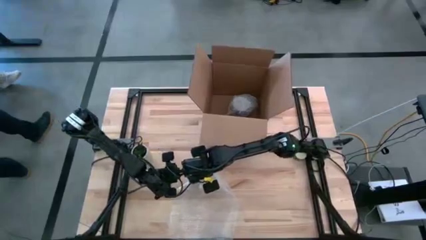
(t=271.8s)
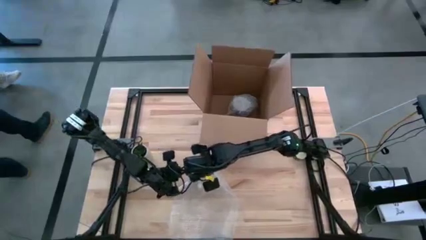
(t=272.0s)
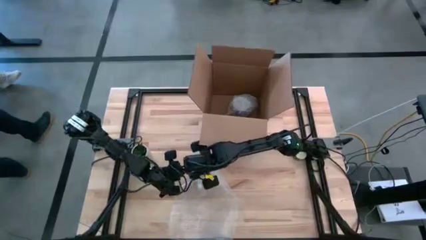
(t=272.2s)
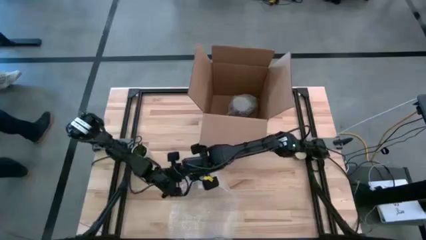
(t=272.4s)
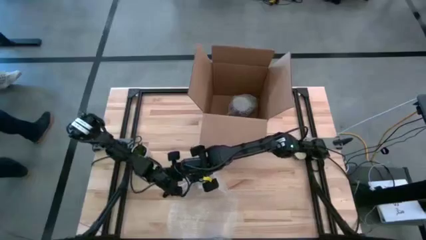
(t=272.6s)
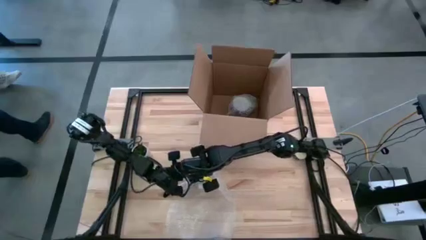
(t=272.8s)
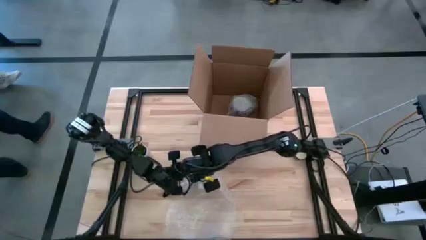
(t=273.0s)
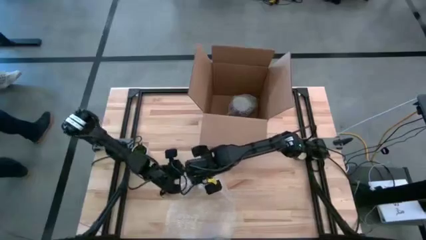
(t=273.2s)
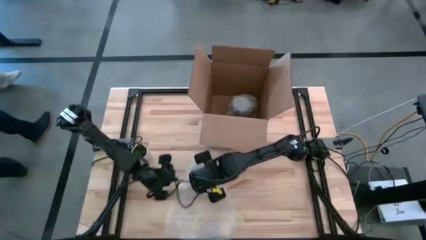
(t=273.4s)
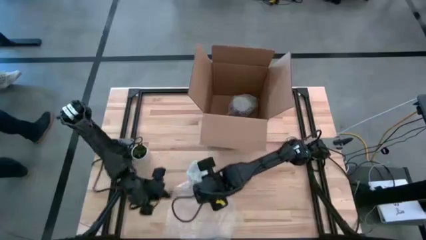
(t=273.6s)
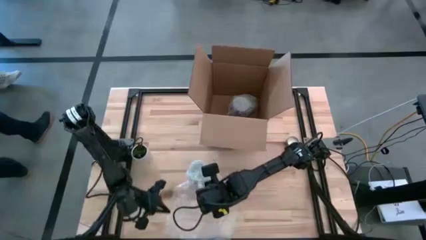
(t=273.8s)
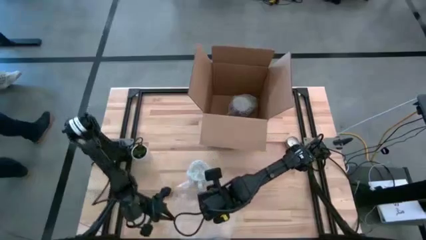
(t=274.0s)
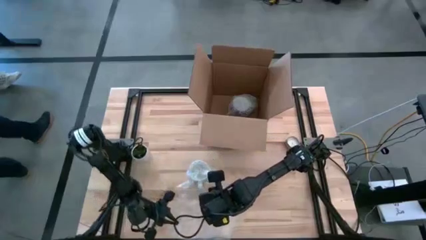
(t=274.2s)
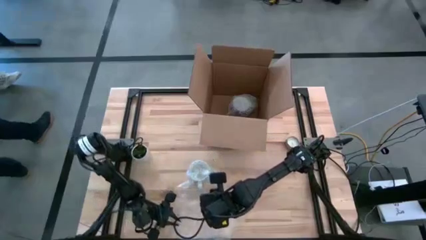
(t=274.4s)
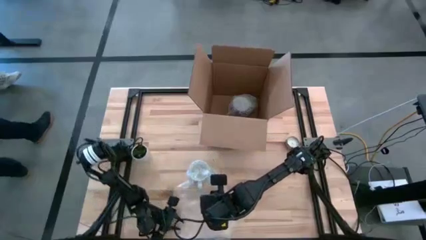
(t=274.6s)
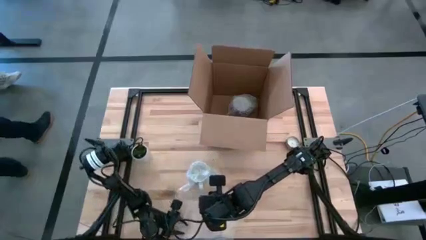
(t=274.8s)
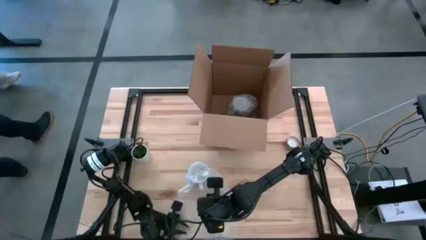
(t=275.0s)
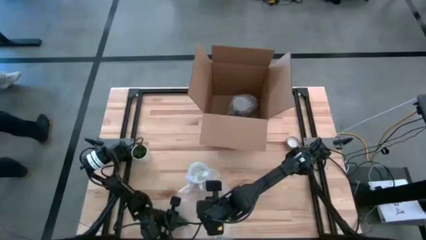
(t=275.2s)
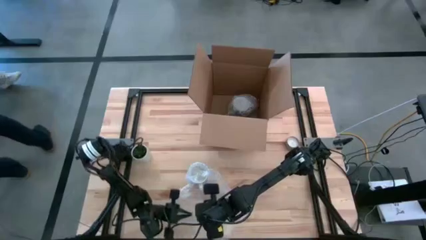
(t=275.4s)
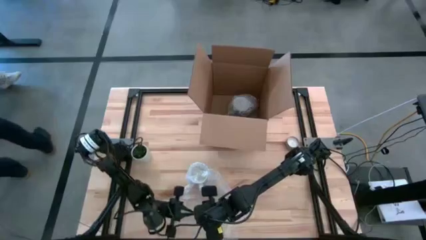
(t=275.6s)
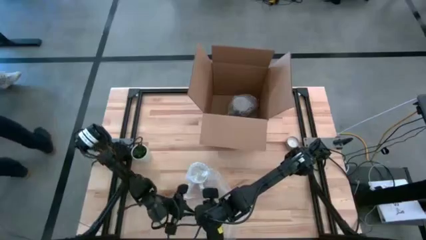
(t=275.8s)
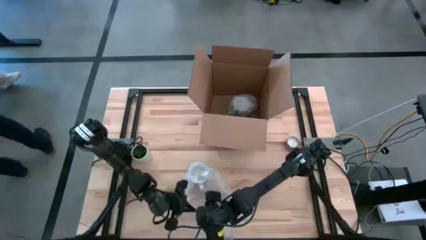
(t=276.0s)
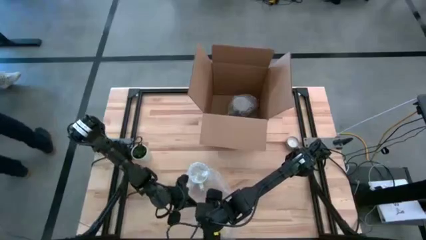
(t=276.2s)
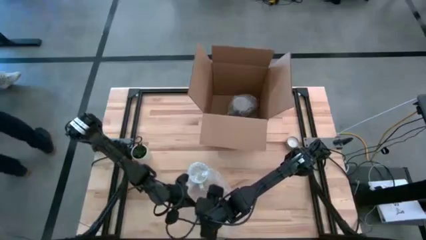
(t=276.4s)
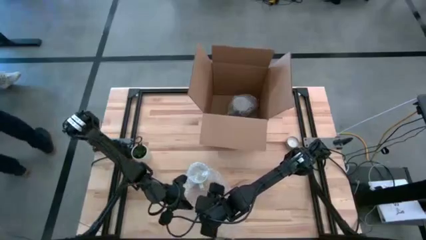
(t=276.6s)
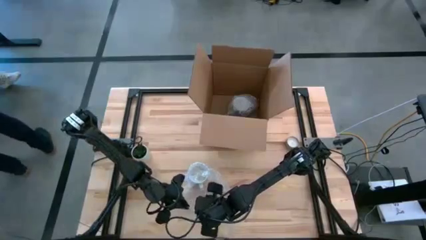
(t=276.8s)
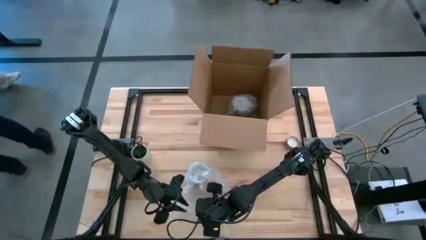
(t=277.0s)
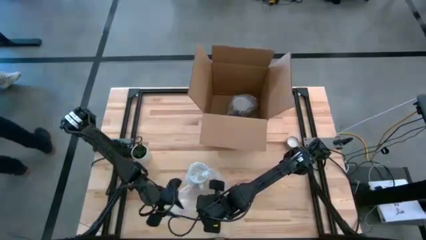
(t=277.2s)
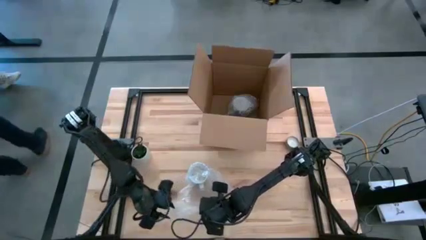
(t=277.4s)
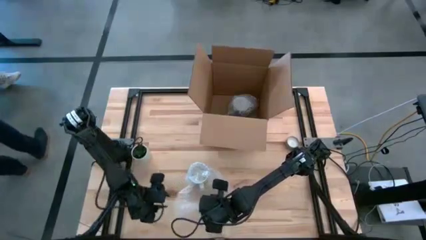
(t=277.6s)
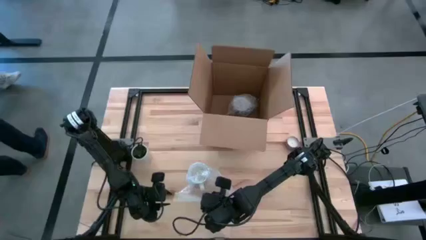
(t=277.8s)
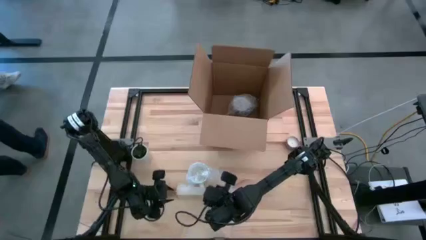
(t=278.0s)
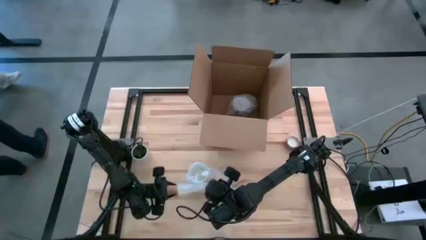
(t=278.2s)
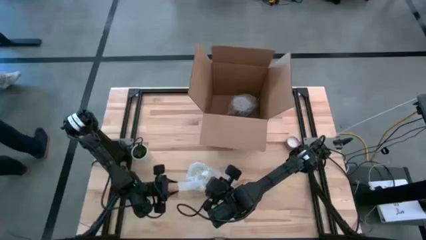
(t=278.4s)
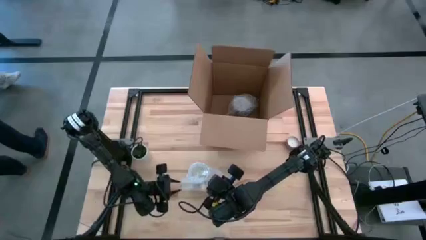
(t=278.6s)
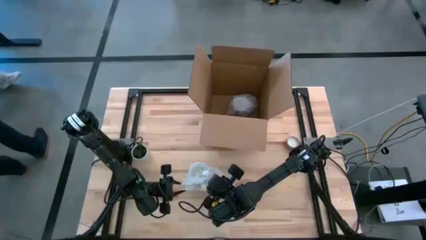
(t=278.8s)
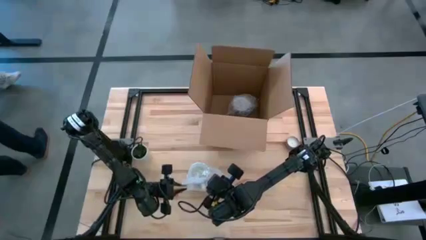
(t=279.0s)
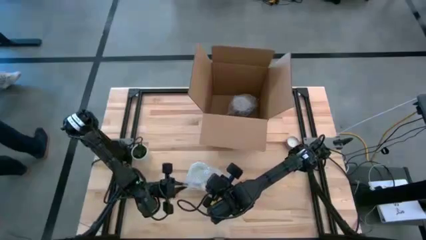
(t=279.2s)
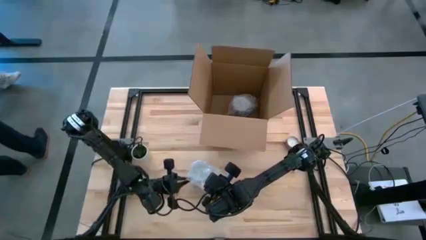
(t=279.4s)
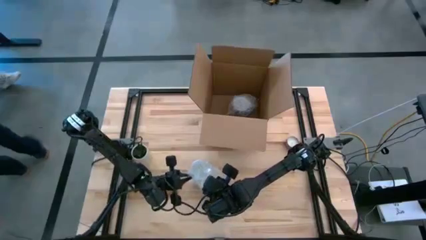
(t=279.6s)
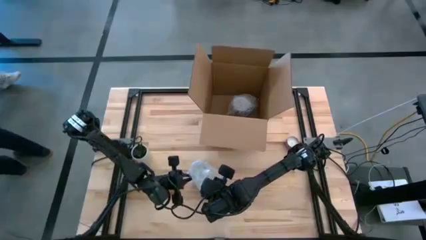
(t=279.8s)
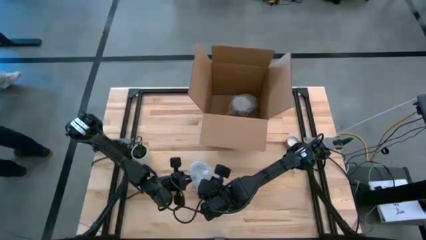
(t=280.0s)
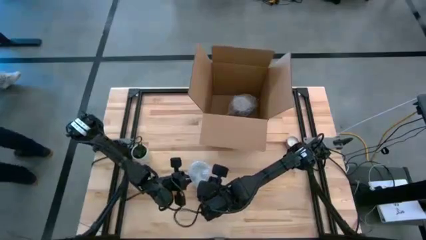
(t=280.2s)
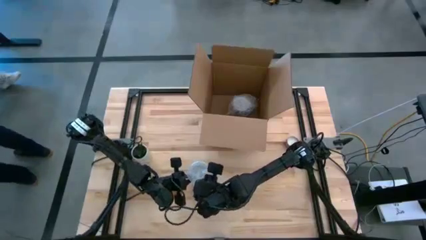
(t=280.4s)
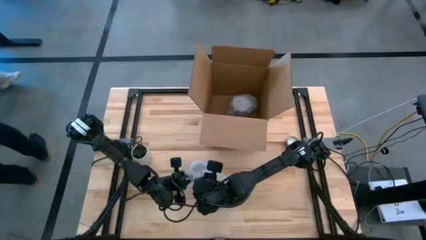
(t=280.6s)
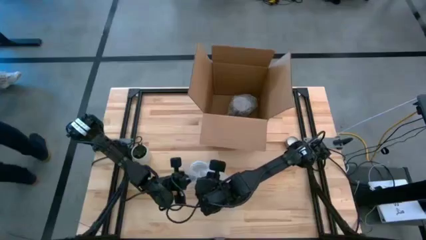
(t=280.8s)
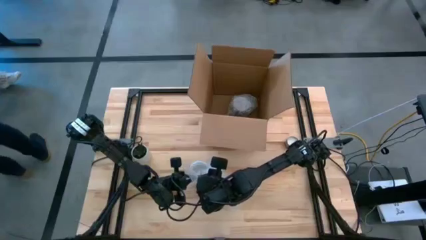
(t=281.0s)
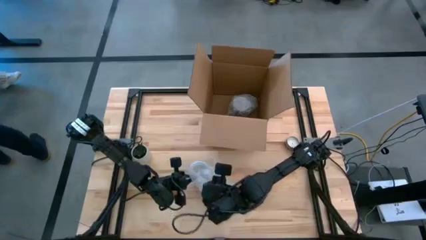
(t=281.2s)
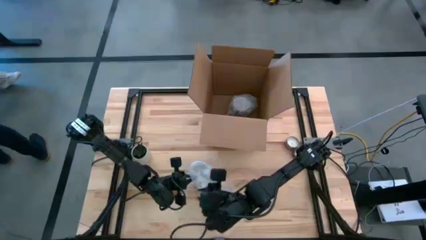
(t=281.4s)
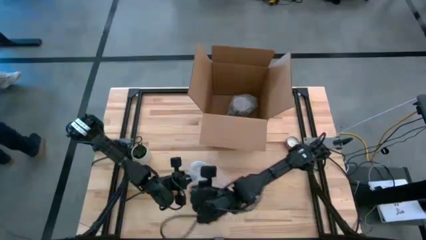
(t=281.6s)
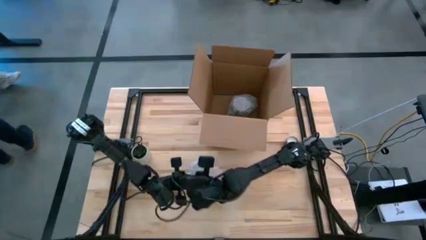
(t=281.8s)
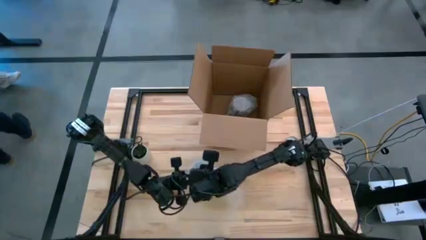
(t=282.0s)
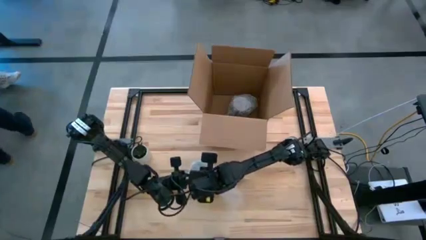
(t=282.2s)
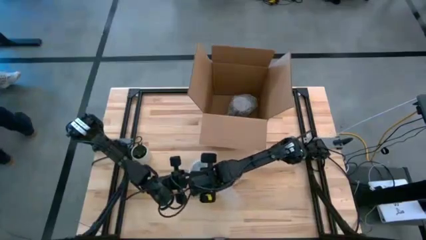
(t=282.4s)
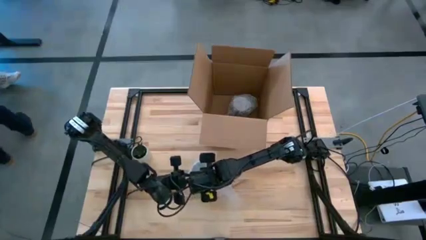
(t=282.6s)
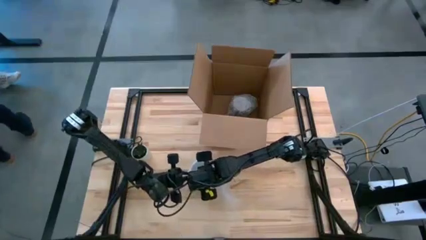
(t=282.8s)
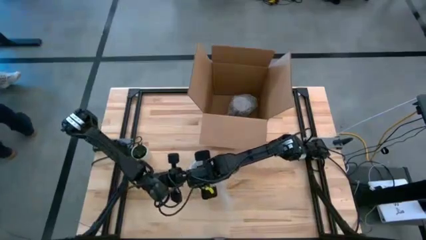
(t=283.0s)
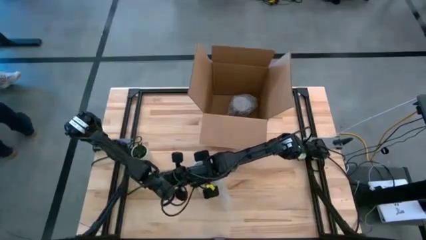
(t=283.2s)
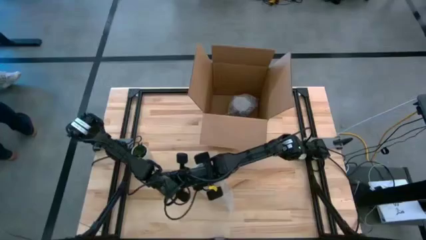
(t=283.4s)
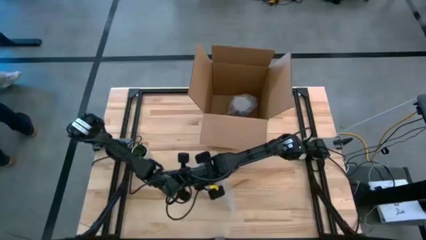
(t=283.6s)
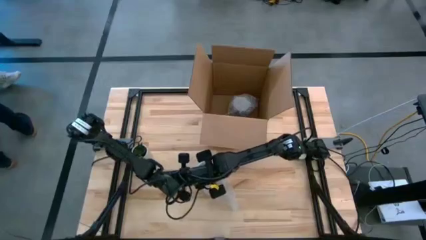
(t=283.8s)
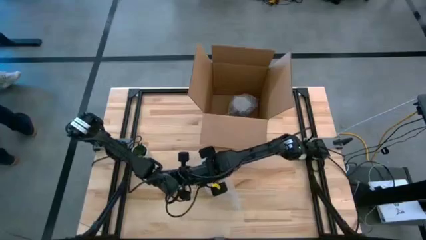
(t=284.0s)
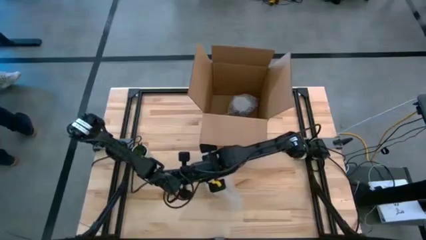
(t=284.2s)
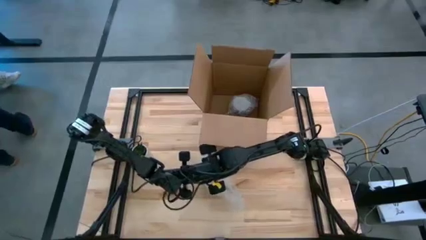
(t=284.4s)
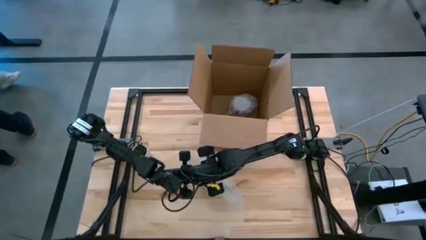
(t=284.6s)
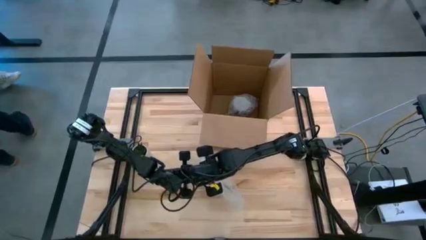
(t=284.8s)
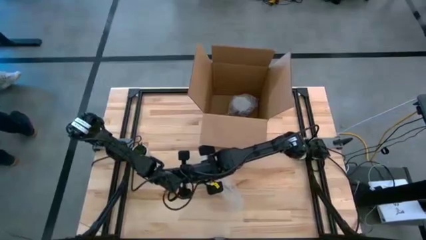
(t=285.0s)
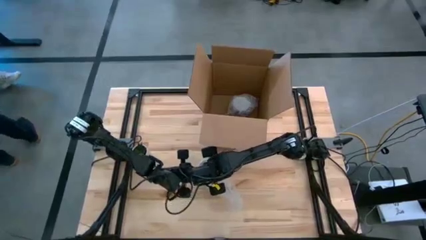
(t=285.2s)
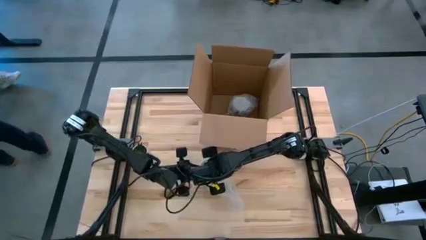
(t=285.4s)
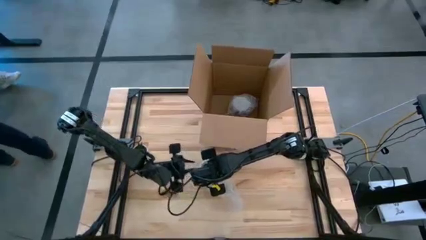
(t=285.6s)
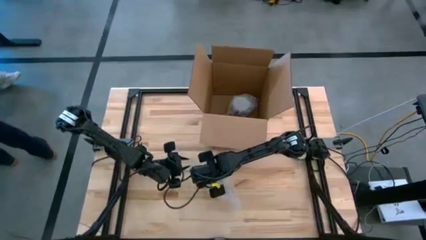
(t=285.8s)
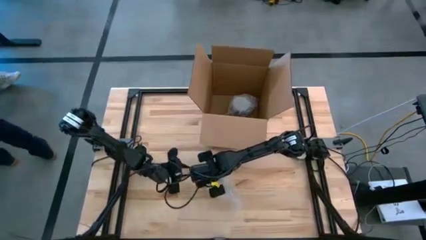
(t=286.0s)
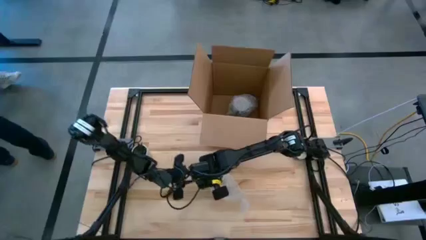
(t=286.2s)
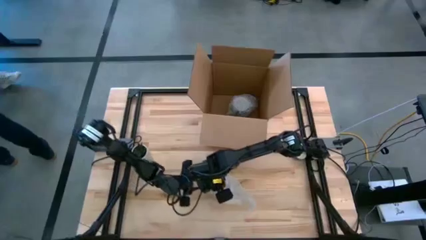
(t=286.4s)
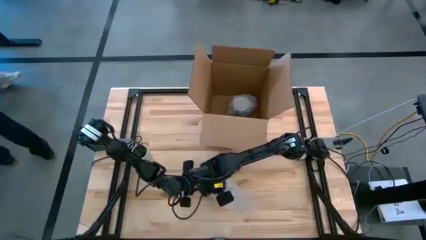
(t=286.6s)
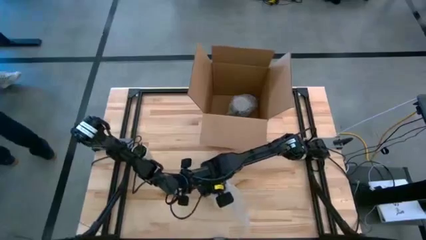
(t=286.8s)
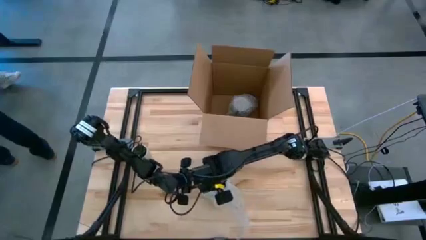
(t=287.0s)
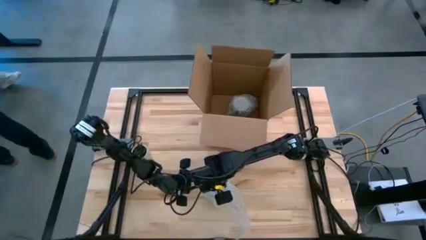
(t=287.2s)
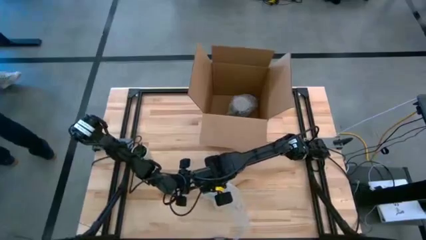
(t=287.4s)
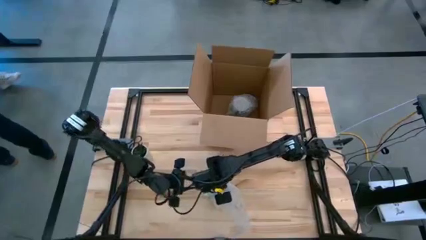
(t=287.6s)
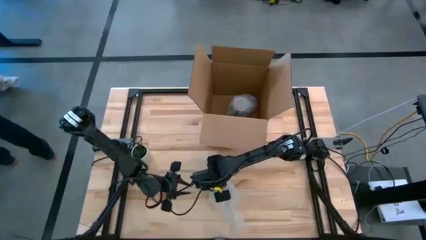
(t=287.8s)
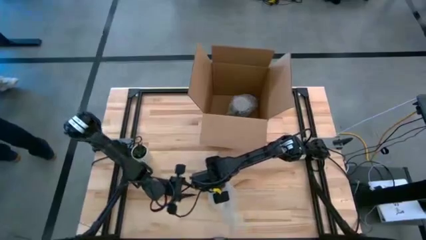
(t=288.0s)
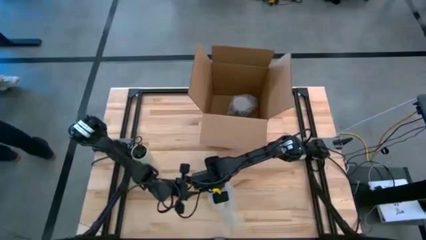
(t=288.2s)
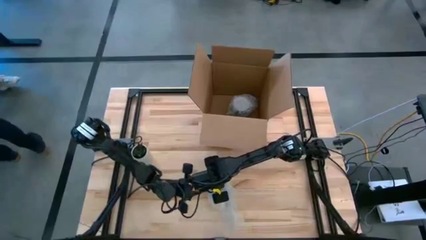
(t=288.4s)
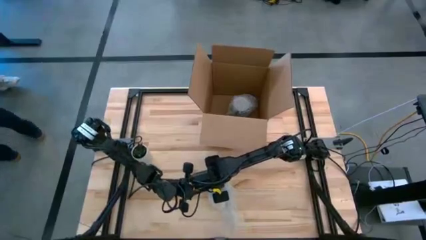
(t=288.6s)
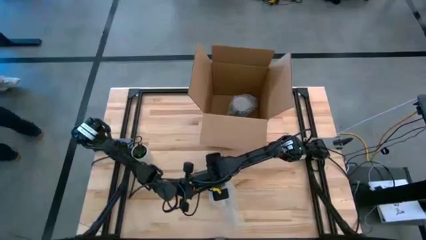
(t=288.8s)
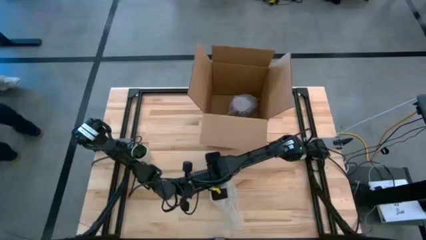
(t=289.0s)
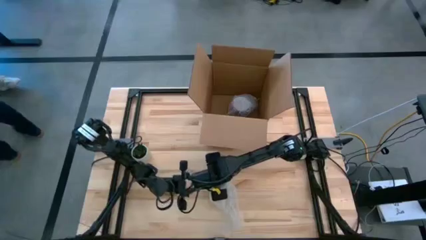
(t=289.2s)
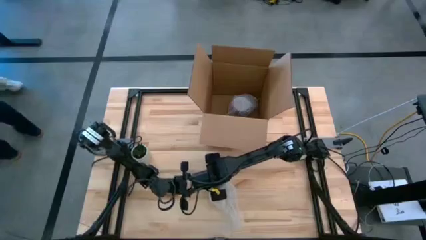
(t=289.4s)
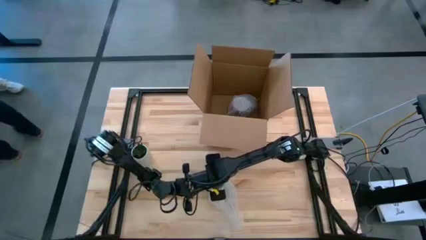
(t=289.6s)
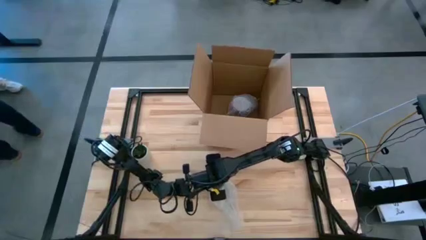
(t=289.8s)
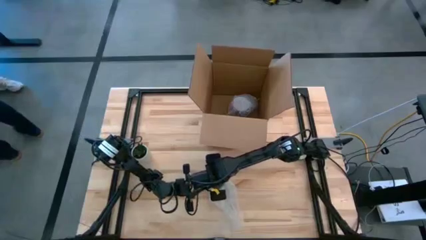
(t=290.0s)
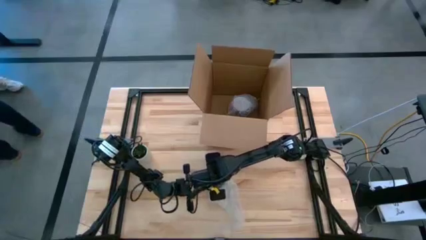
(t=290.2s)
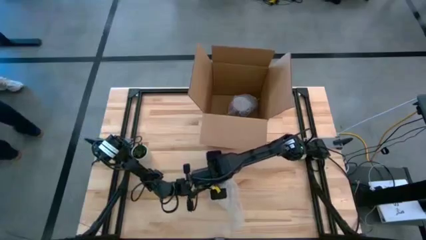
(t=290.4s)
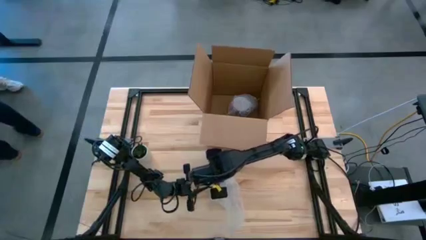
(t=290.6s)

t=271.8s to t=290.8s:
Task: wrap mug
Wrap the blue patterned mug with the bubble wrap
